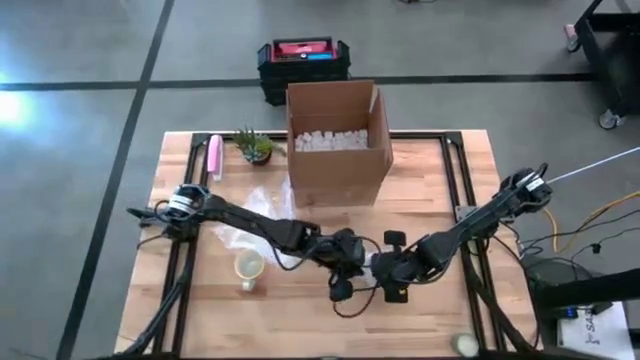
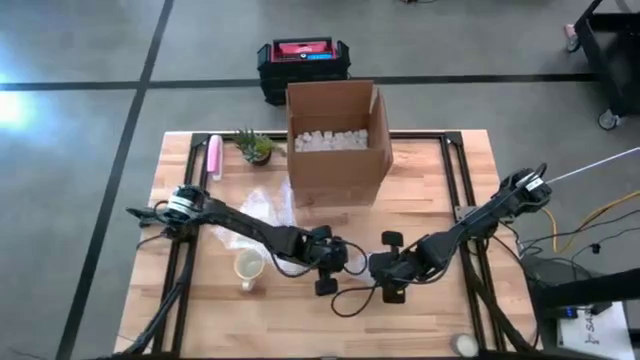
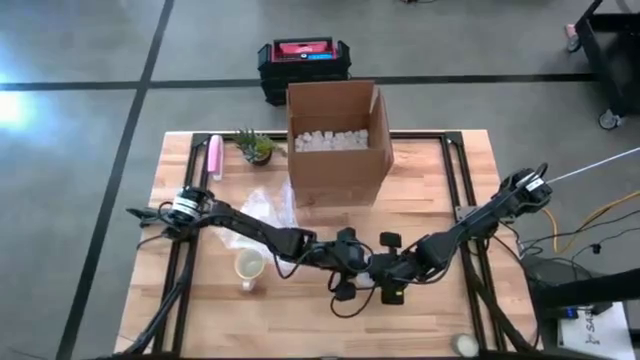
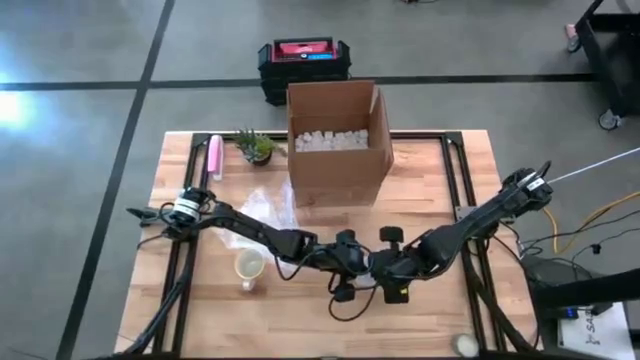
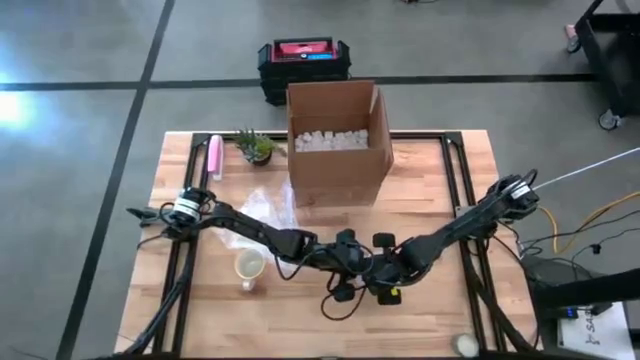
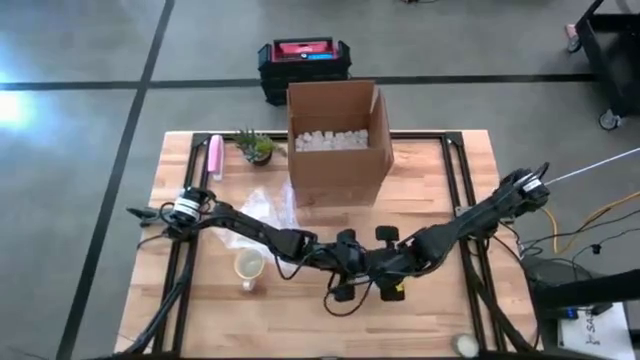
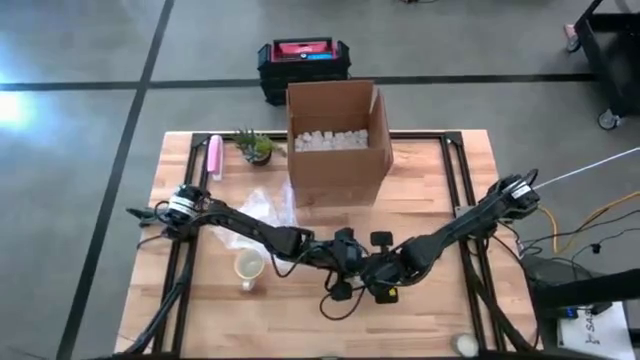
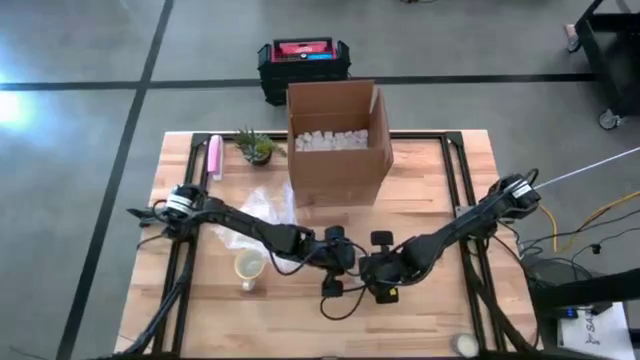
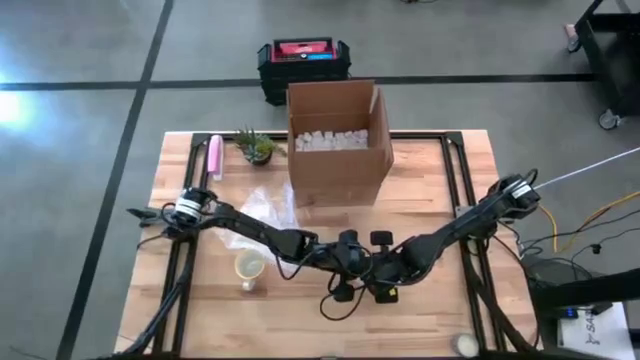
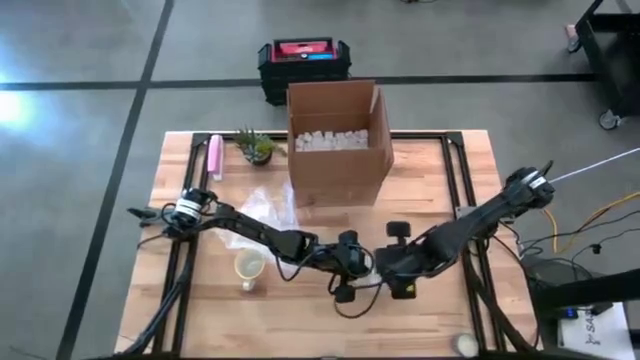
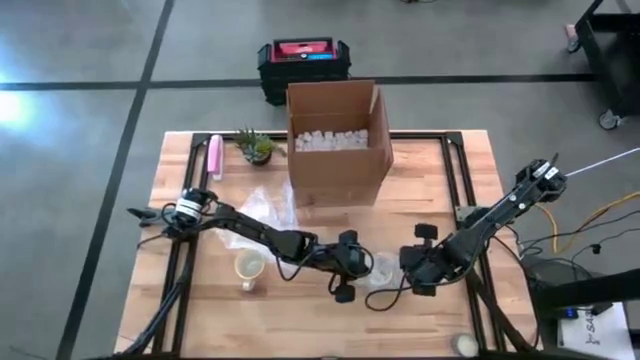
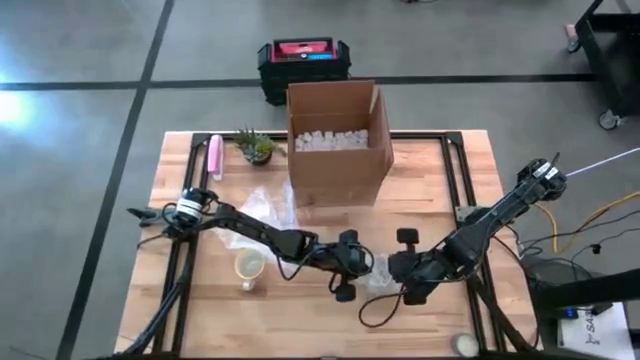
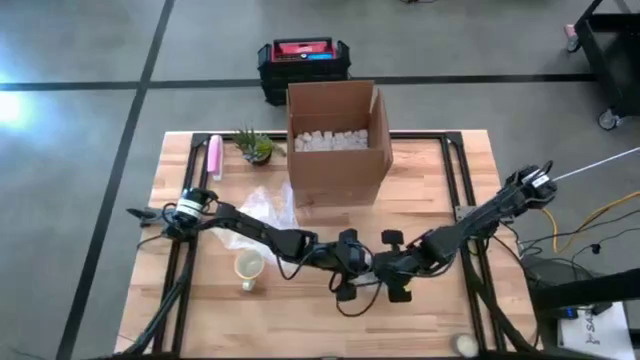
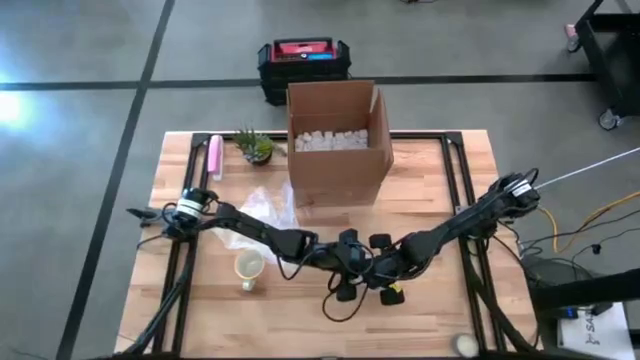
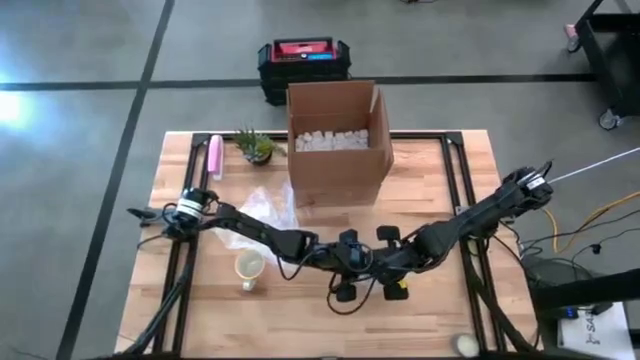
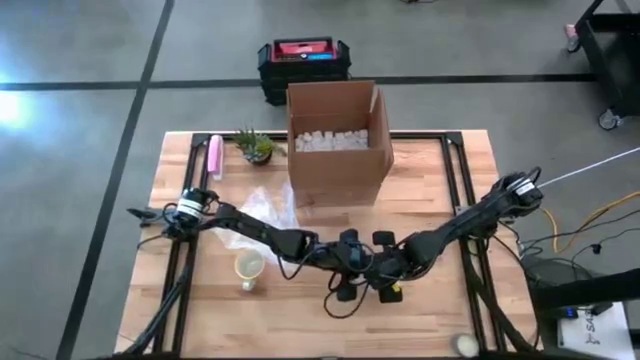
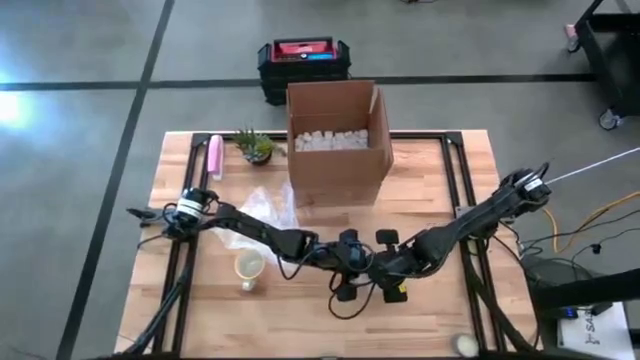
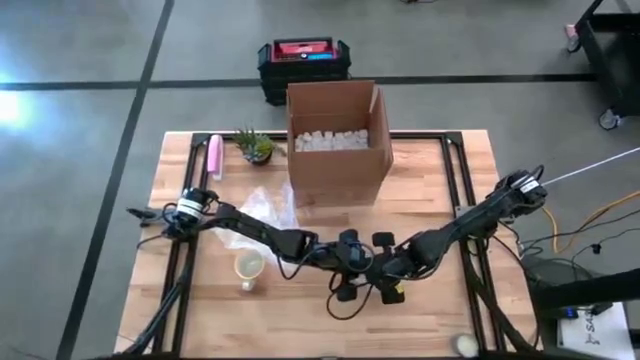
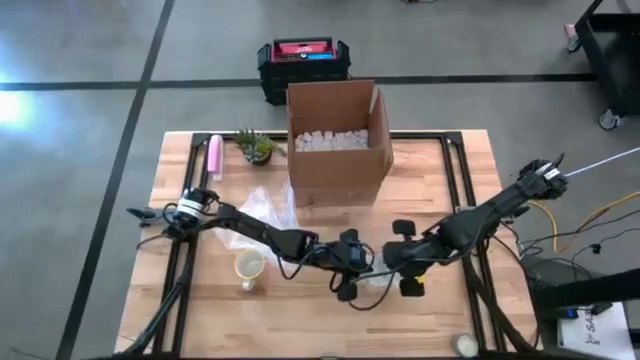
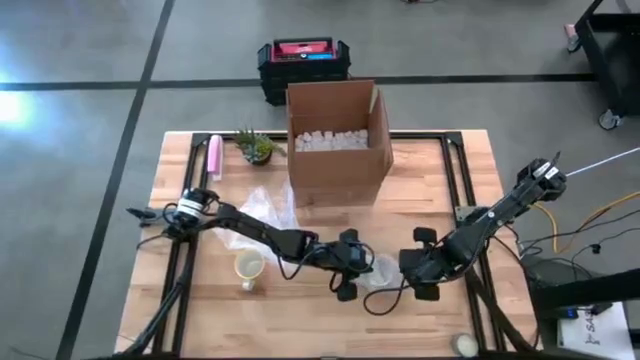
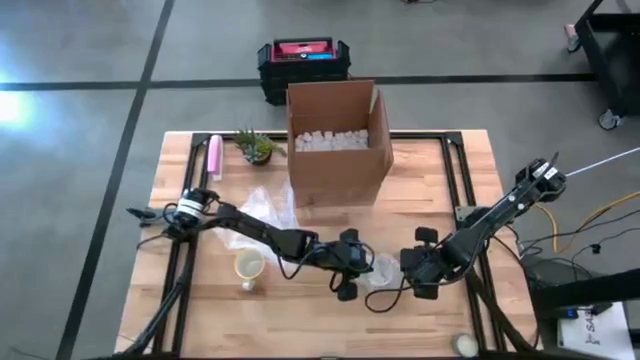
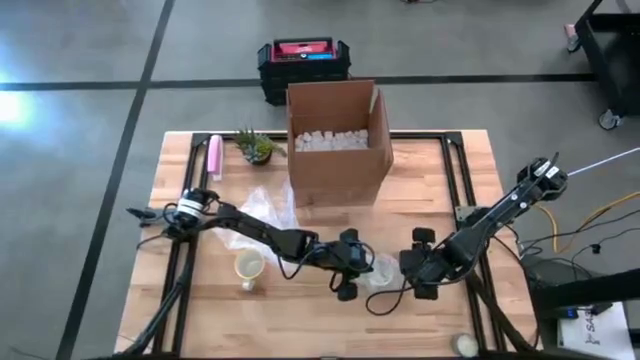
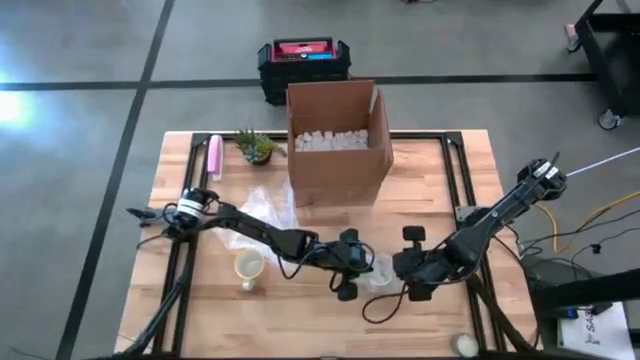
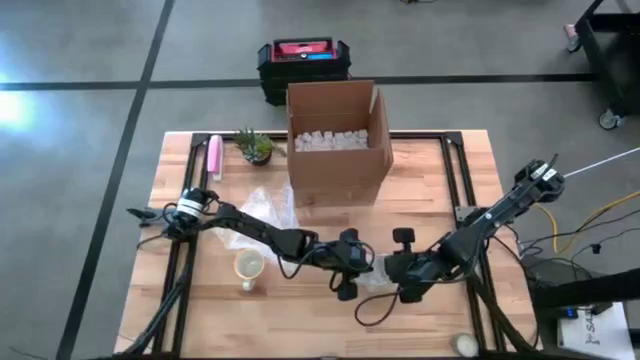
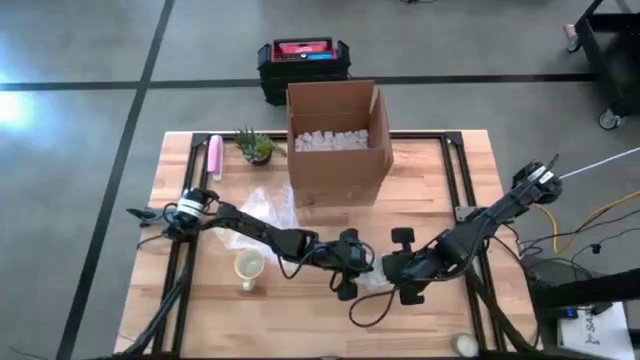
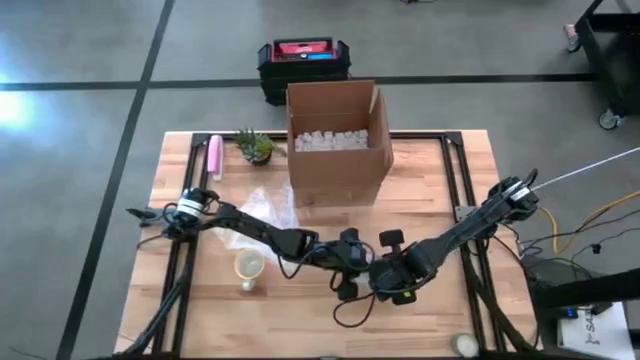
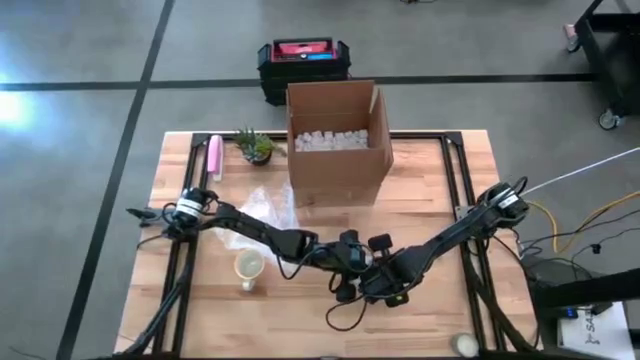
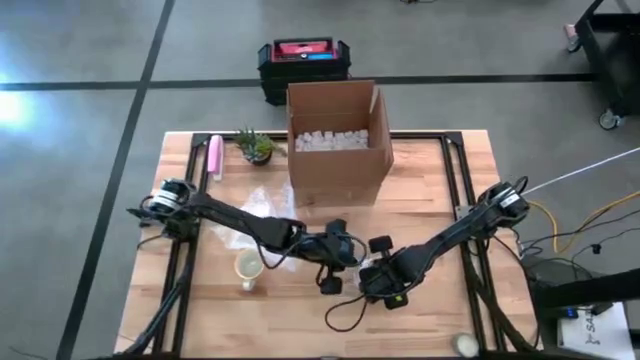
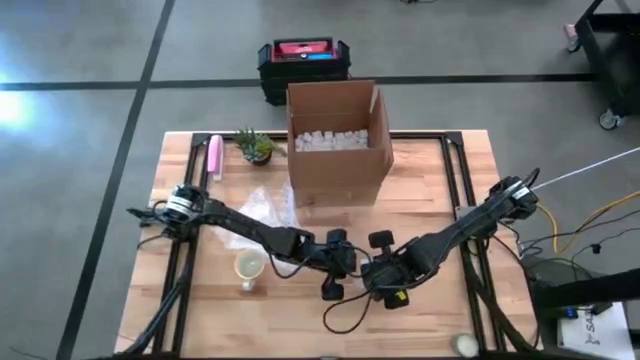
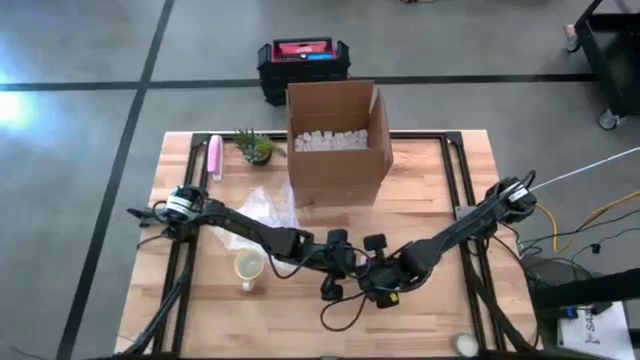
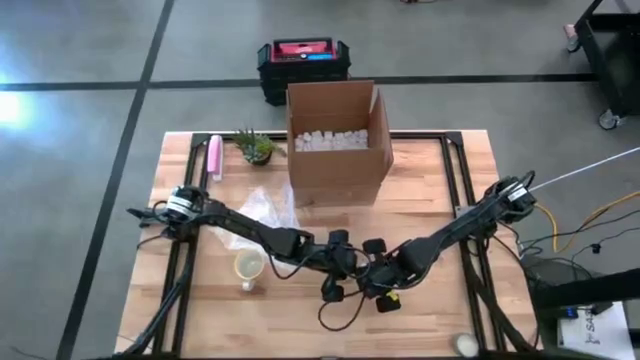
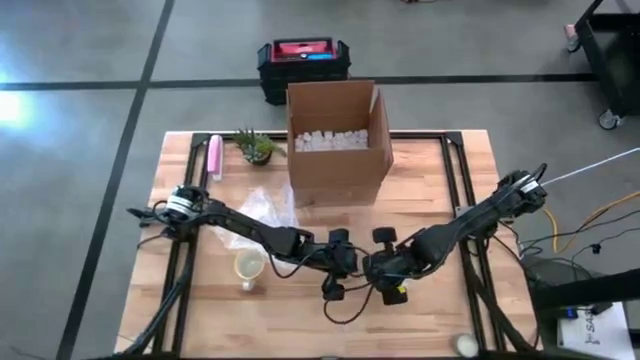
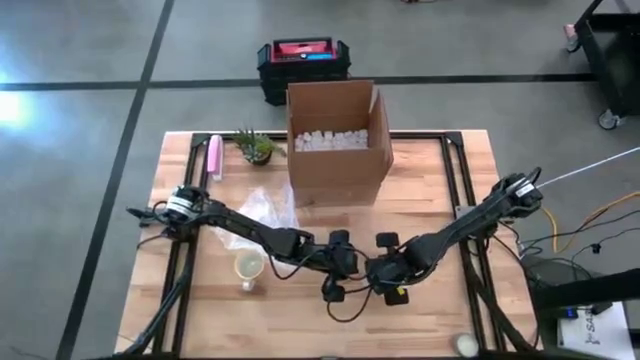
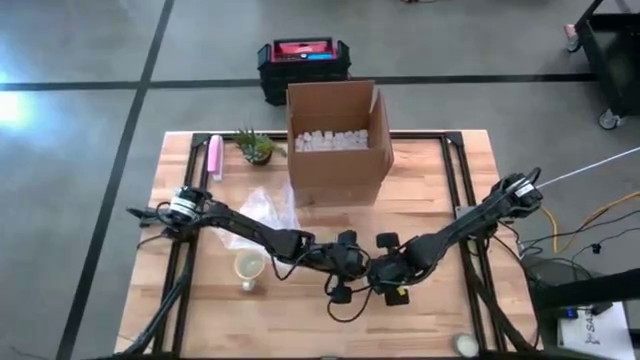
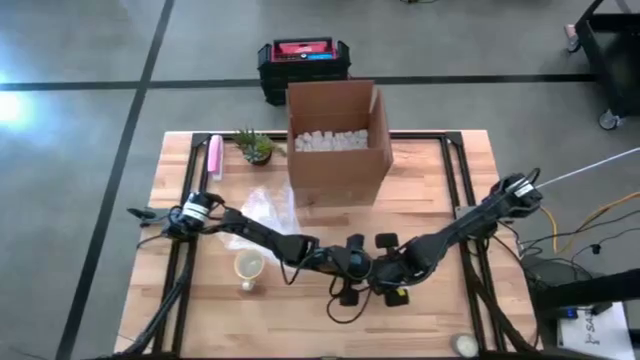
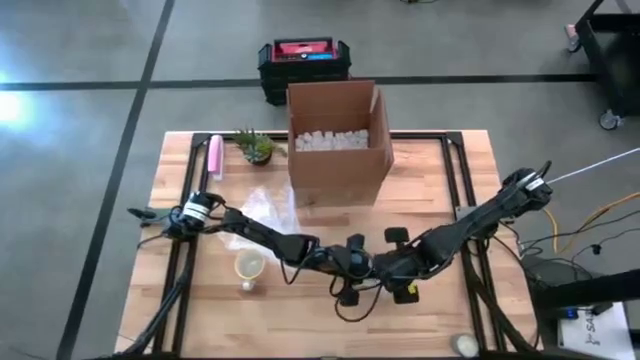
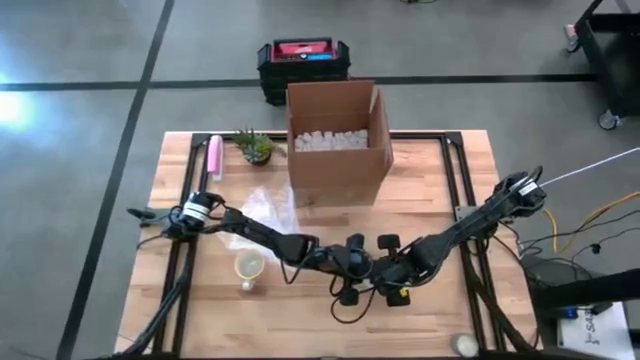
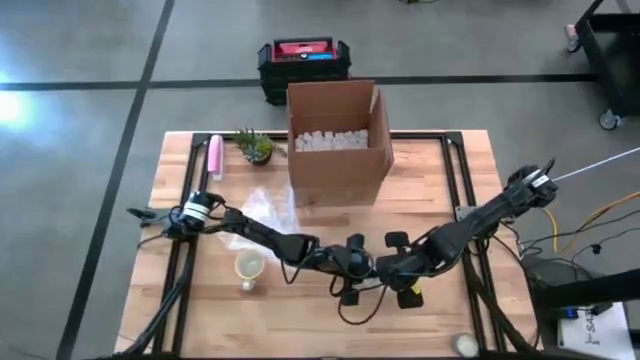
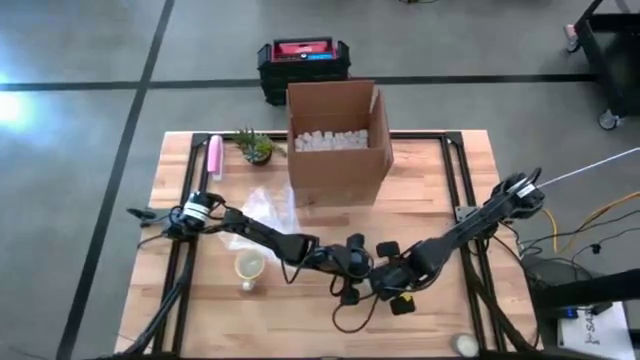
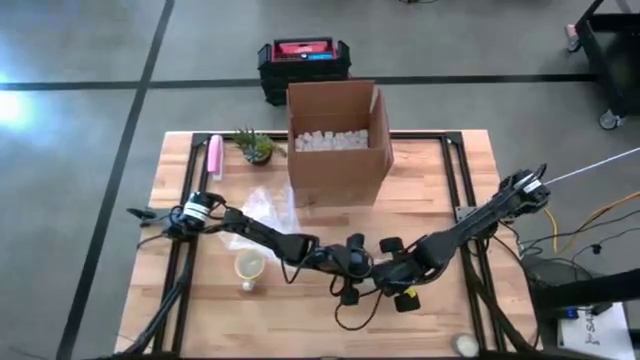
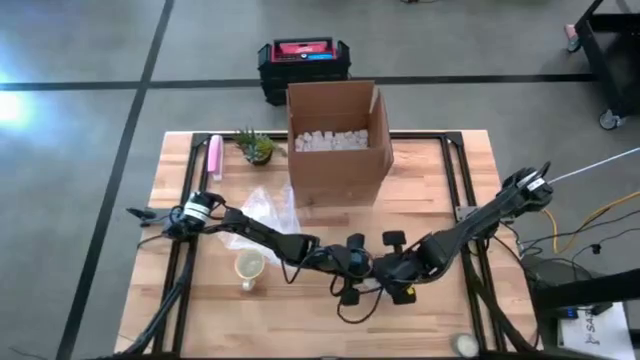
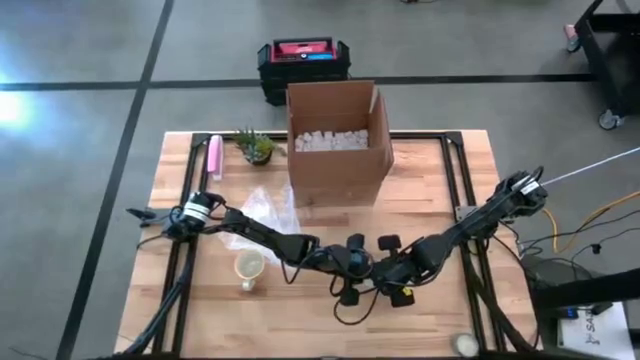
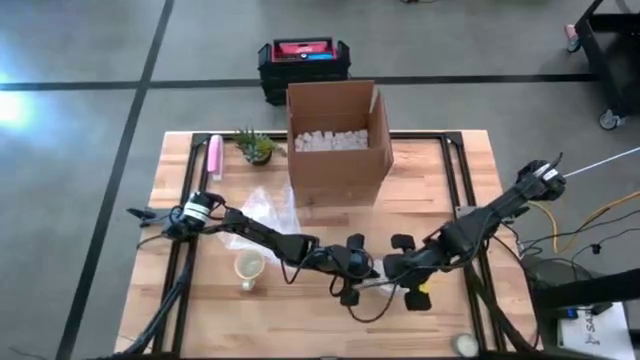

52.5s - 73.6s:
Task: wrap mug
Wrap the gray patterned mug using the right bubble wrap
